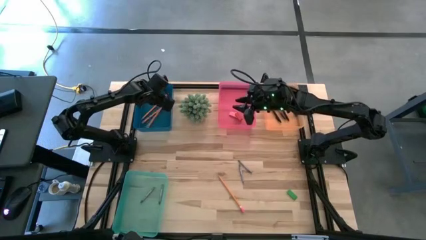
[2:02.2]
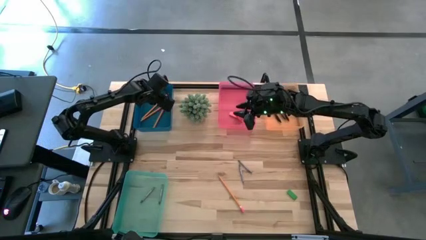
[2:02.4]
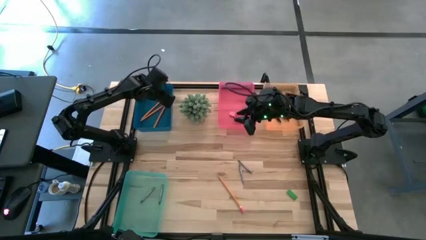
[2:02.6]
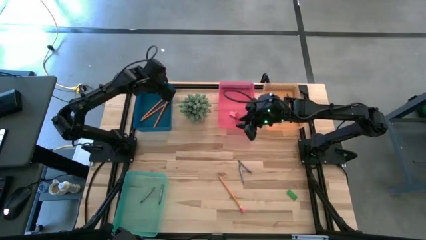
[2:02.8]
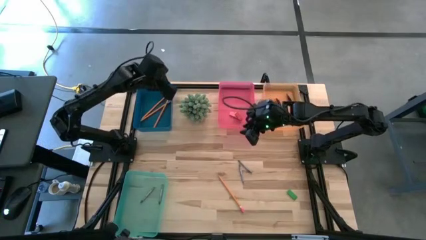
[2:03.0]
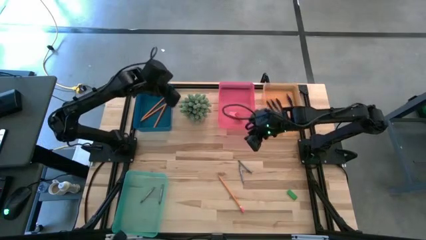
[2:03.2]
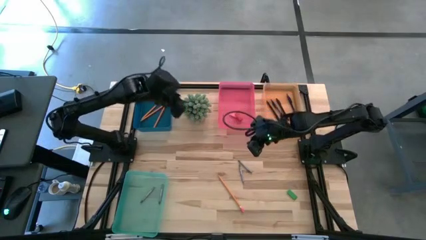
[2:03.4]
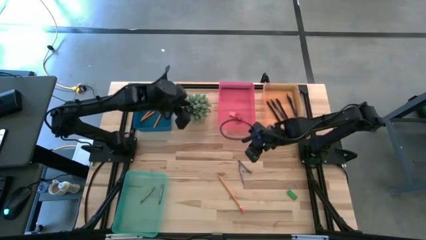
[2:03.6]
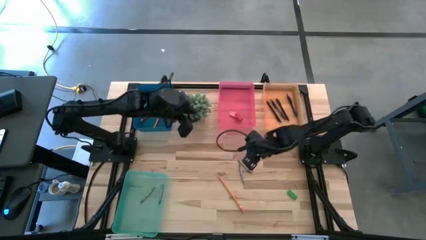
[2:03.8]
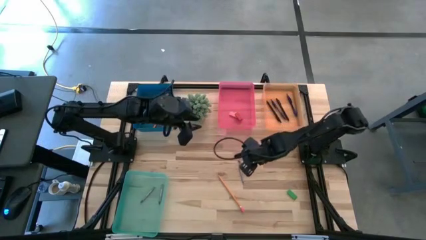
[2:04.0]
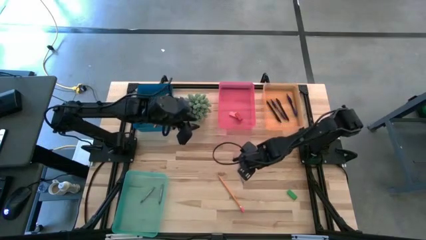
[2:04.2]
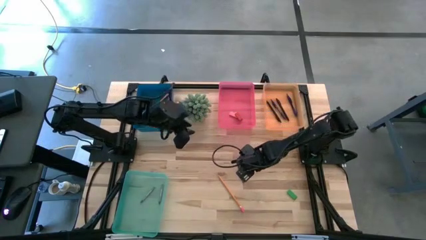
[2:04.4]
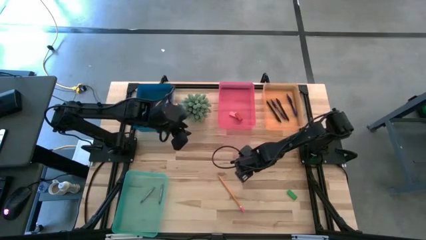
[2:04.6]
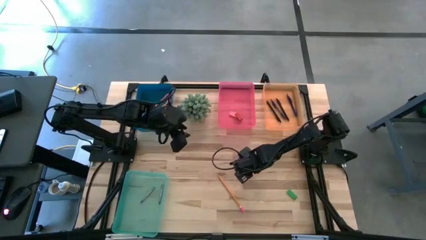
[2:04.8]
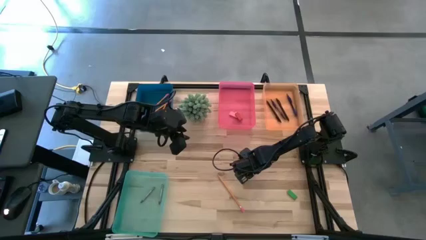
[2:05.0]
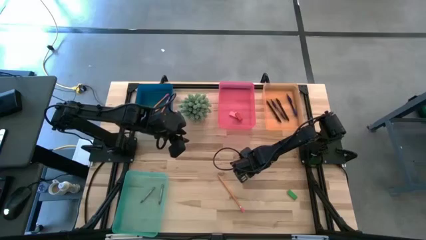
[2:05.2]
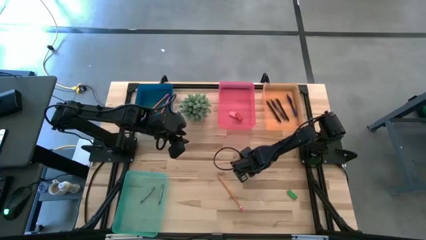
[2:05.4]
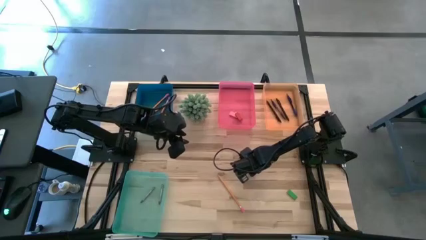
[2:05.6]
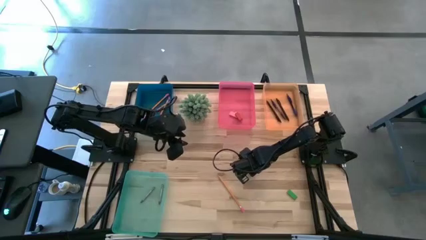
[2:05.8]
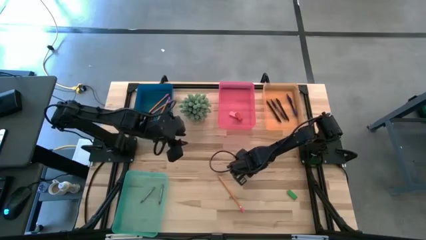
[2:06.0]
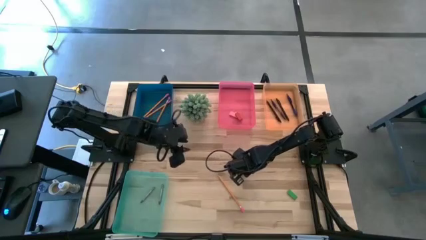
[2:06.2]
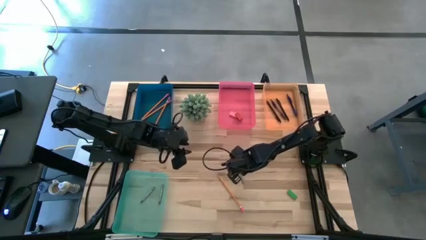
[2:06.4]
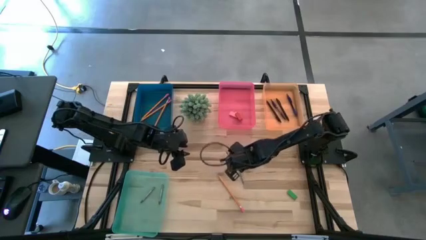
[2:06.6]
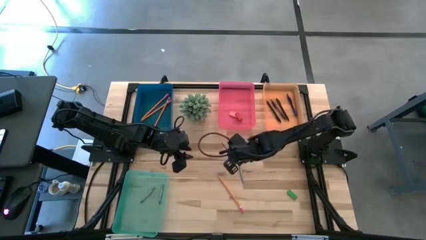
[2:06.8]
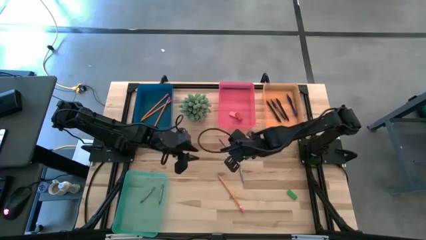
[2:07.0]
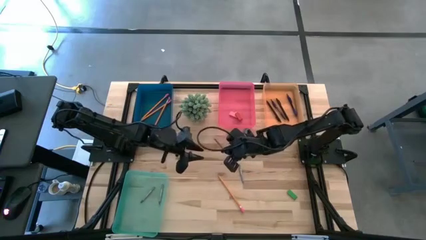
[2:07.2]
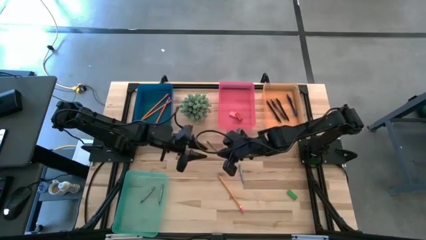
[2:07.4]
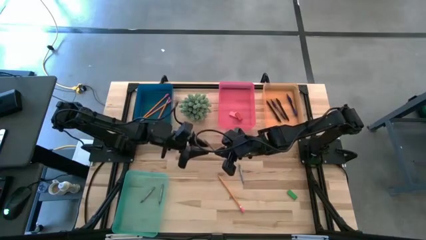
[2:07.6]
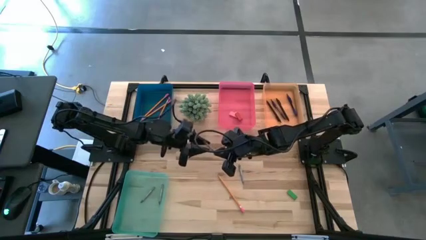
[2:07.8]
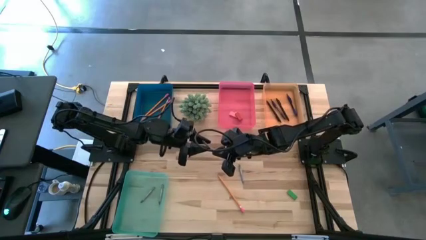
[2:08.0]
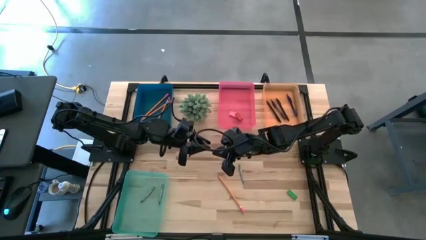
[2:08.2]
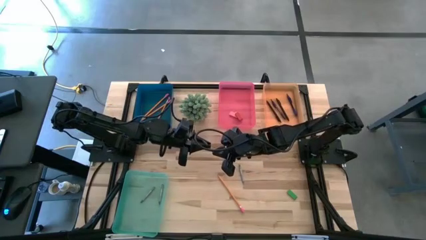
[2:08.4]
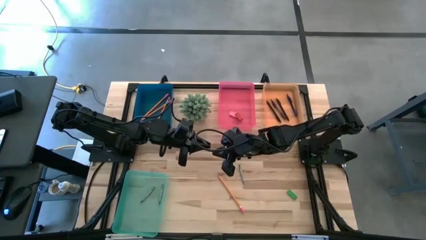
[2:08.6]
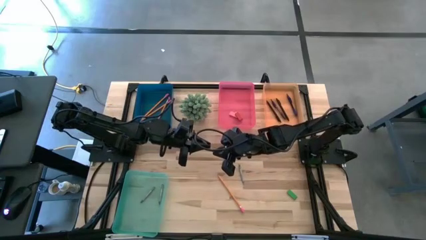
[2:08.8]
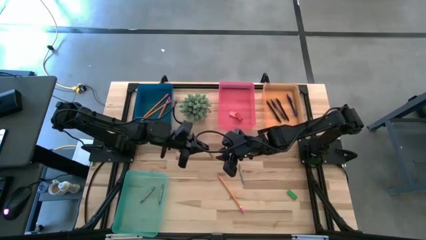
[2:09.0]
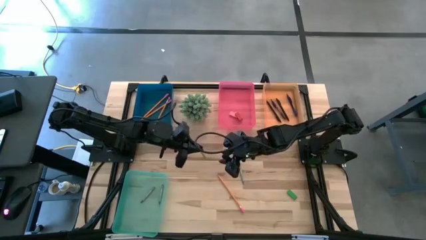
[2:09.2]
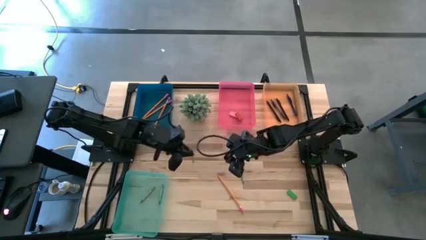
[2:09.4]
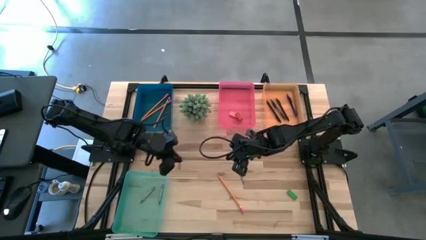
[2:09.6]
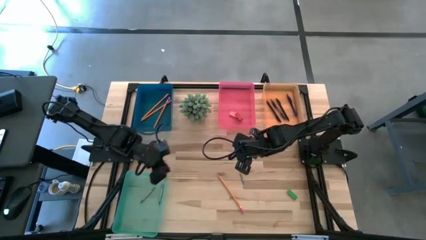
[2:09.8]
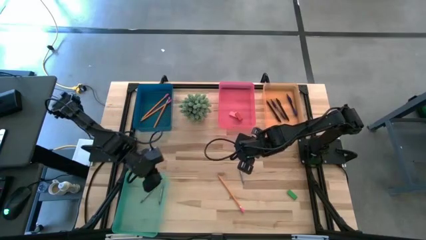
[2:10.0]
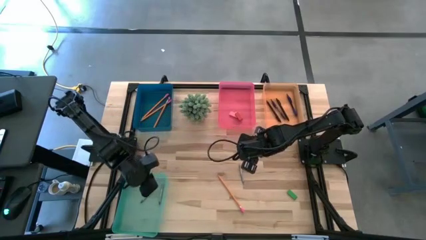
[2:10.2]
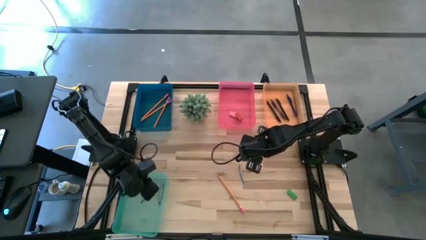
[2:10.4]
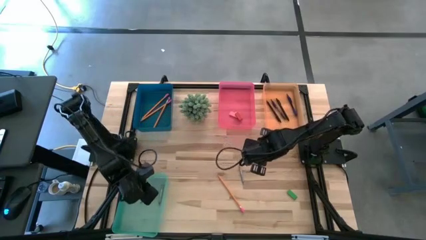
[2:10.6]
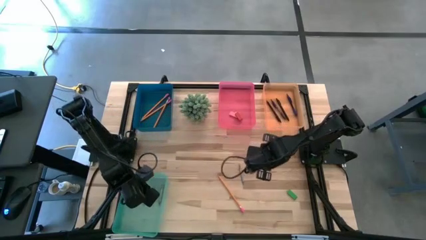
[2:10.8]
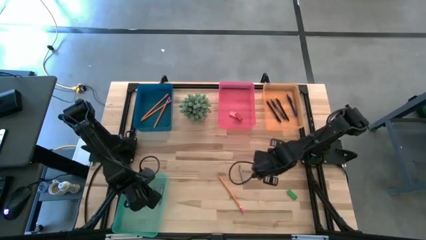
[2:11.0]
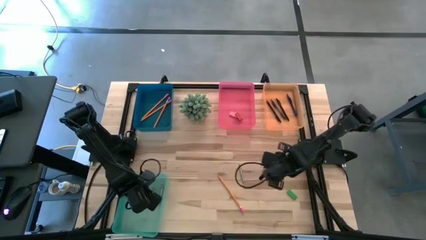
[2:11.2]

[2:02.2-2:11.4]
Task: Sort crayons/erasers/pens/pencils in bins
Put the gray crayon into the green bin

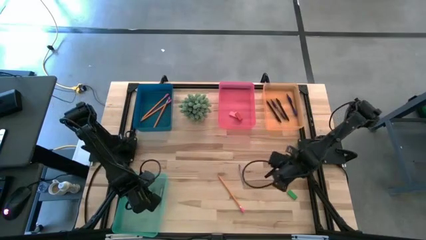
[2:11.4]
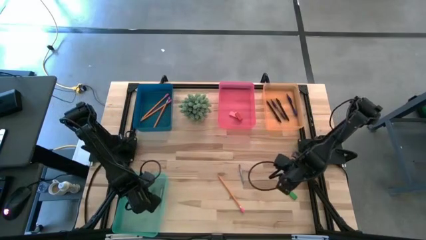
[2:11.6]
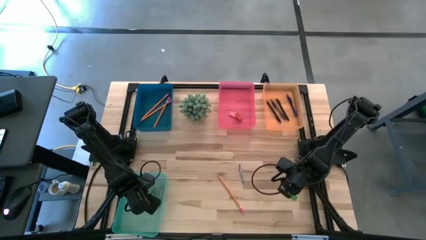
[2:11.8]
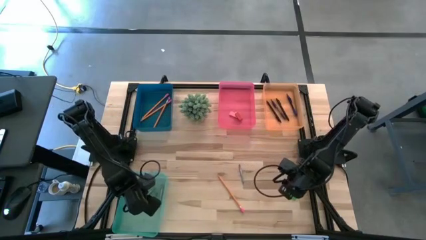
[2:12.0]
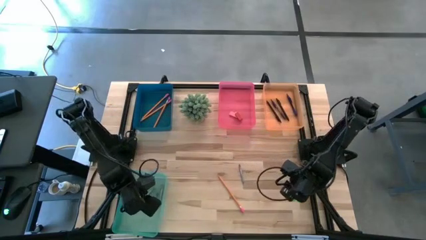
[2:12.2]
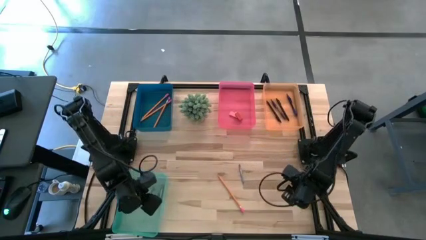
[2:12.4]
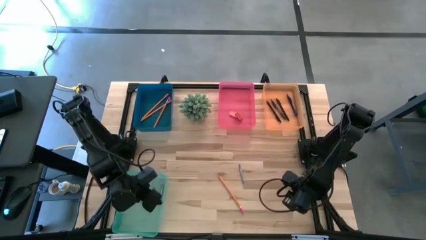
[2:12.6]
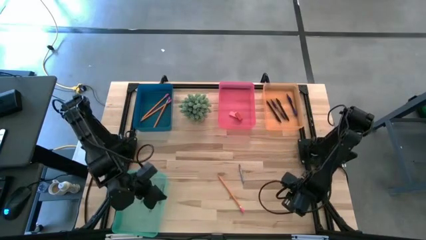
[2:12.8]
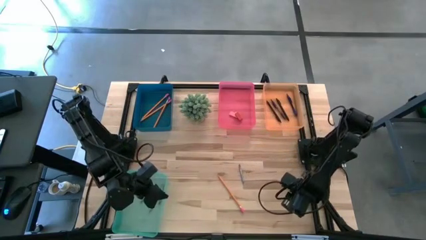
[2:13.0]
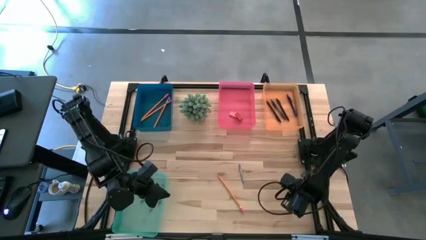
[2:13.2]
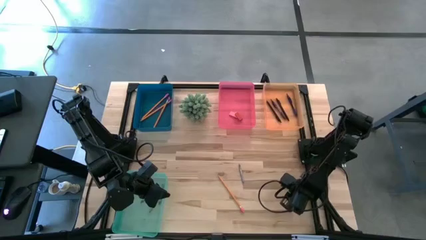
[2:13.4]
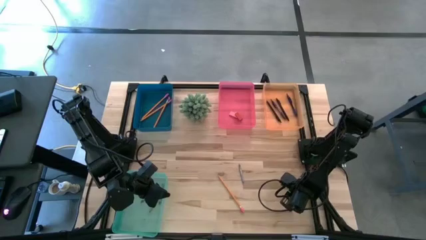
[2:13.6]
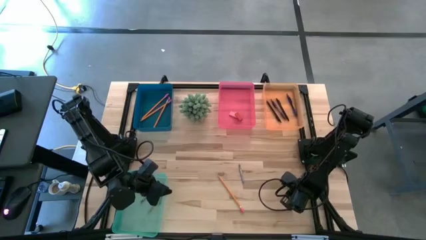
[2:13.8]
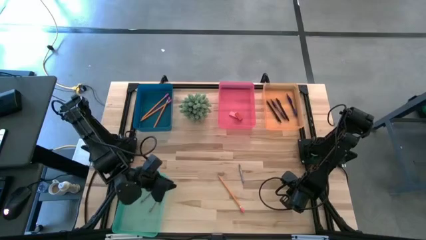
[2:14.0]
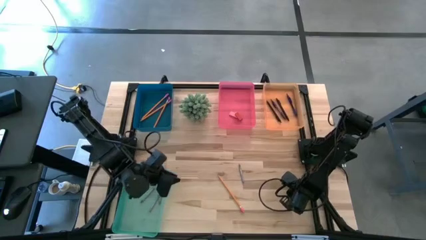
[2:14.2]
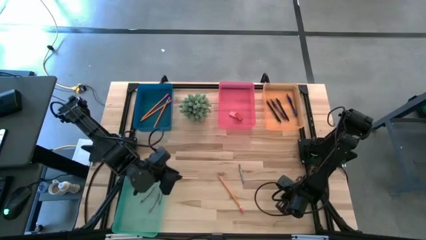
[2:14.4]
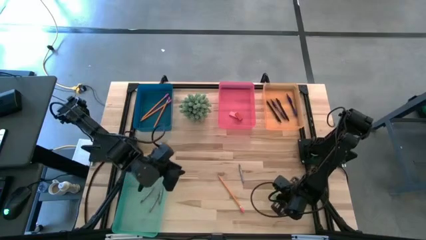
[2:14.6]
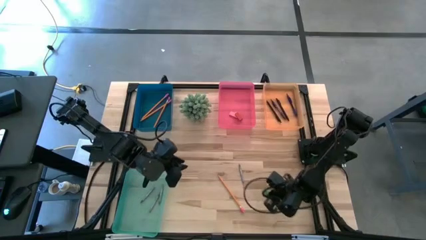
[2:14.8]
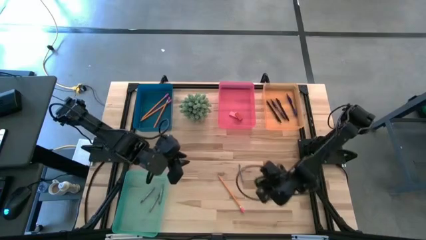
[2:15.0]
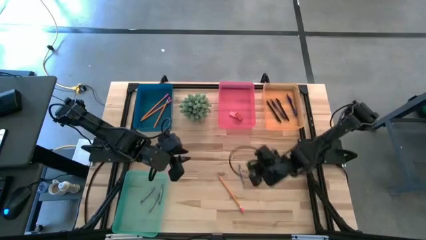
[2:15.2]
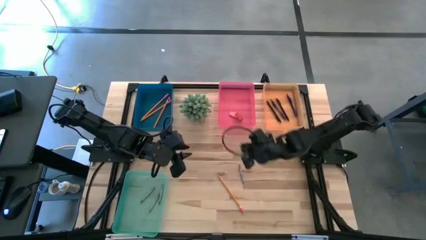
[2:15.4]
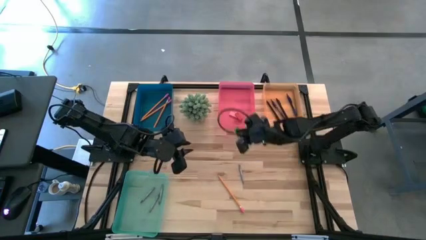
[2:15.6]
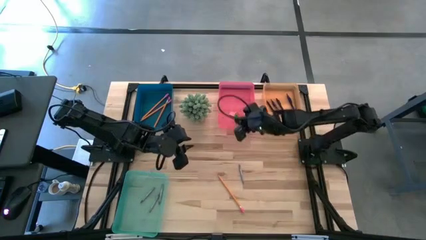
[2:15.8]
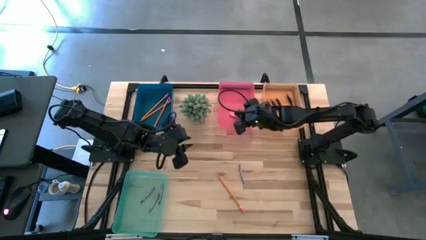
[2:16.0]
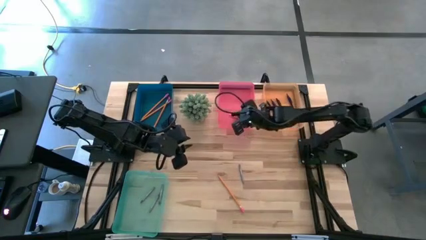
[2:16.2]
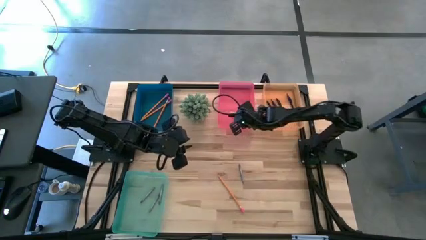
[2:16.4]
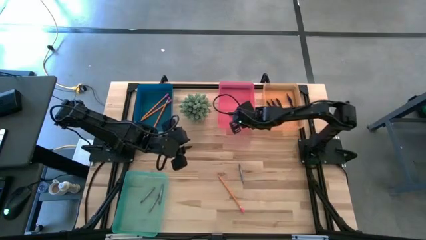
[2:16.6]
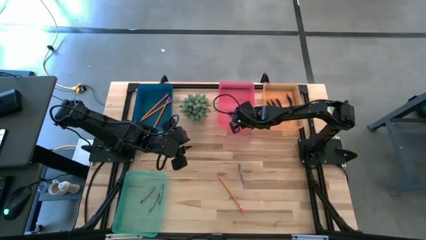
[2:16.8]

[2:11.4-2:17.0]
Put the green eraser into the pink bin
